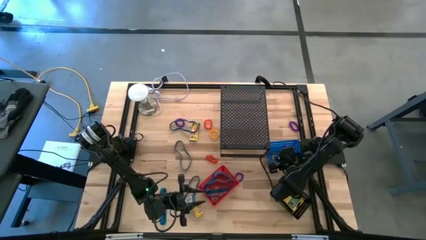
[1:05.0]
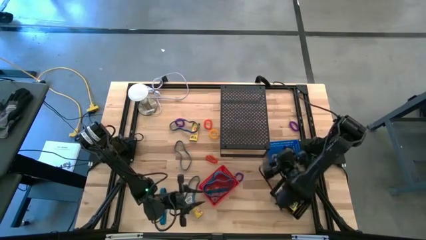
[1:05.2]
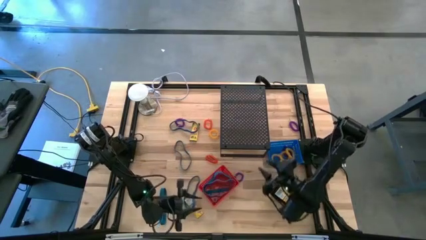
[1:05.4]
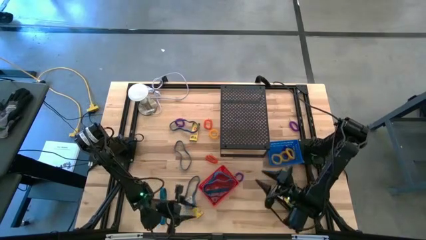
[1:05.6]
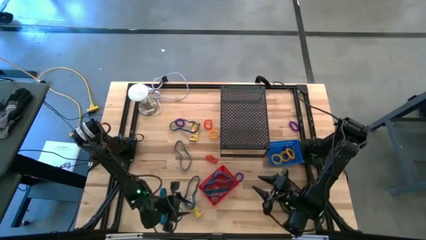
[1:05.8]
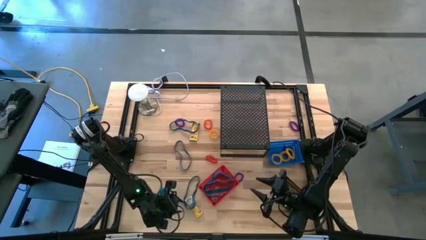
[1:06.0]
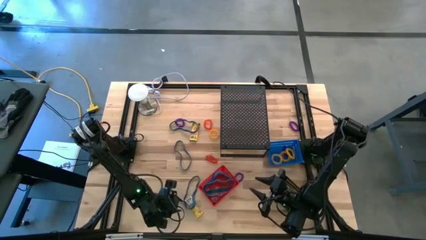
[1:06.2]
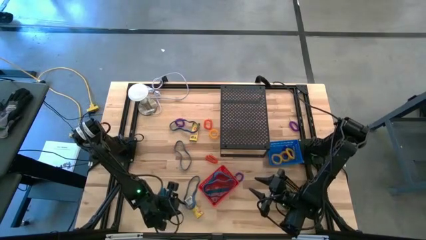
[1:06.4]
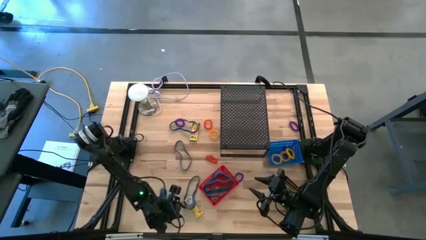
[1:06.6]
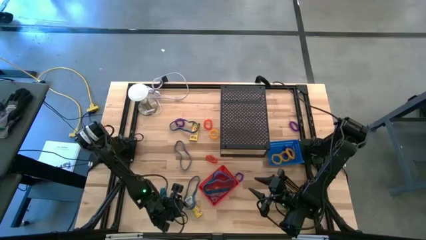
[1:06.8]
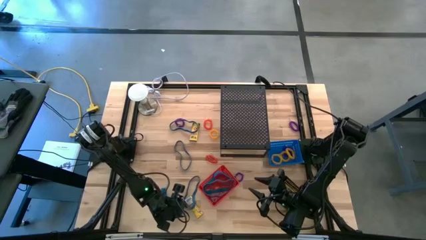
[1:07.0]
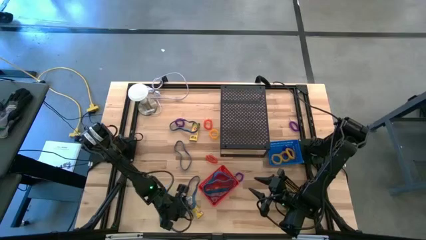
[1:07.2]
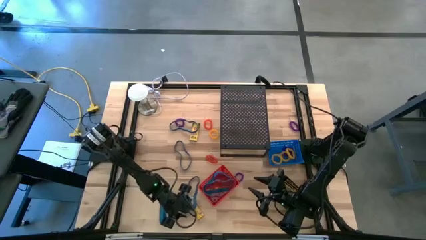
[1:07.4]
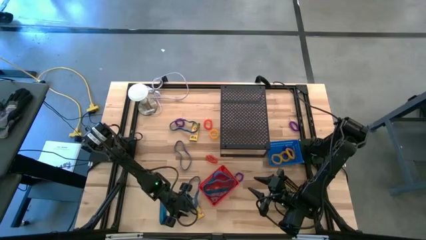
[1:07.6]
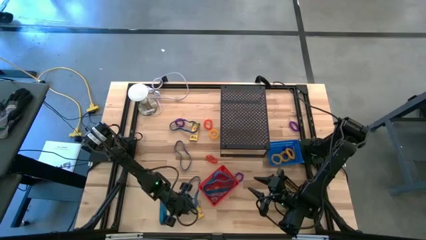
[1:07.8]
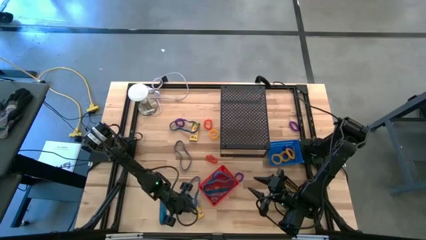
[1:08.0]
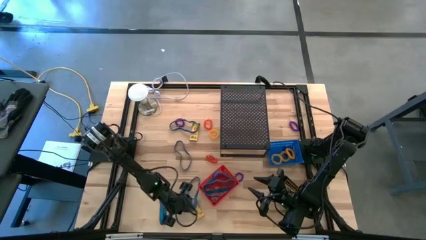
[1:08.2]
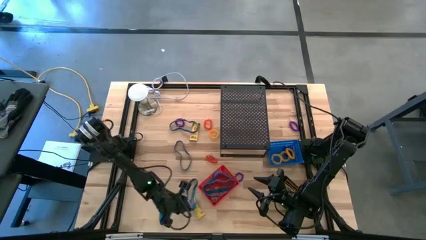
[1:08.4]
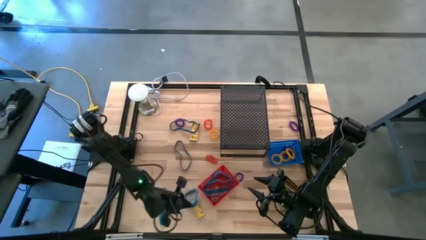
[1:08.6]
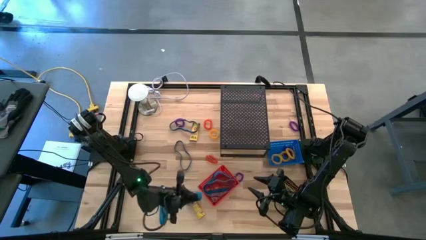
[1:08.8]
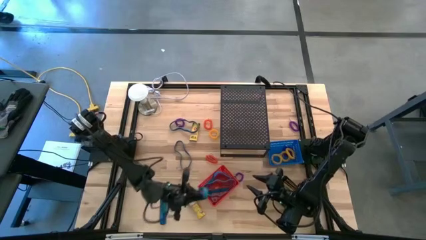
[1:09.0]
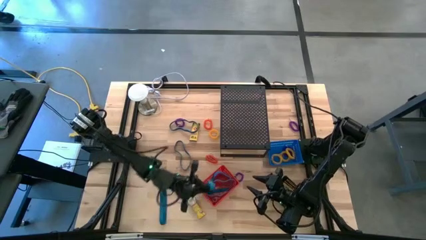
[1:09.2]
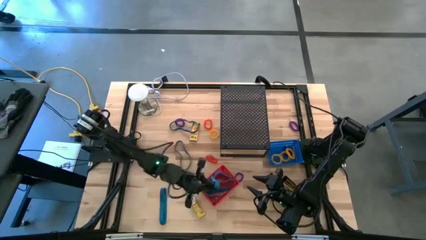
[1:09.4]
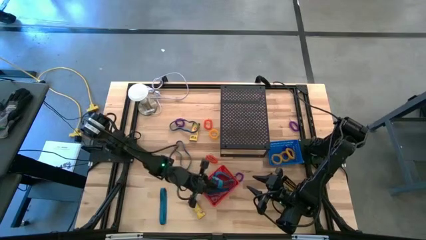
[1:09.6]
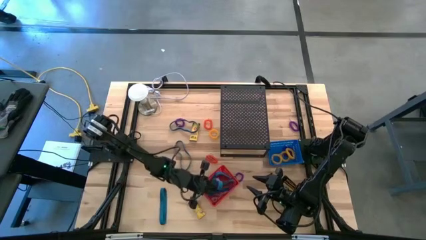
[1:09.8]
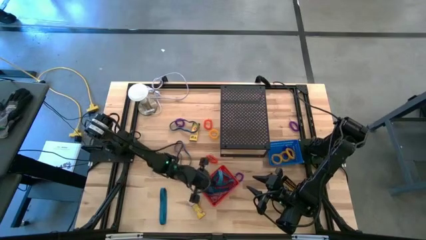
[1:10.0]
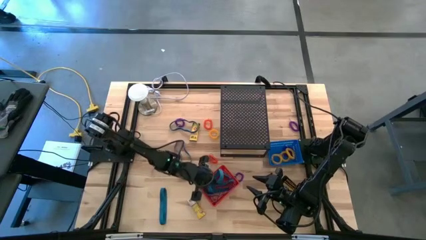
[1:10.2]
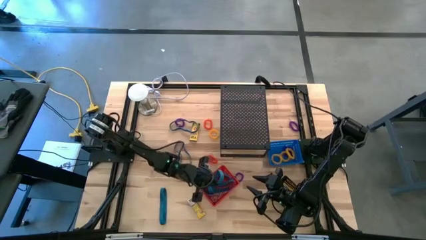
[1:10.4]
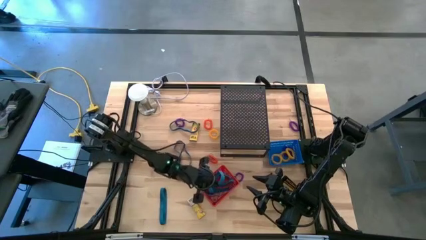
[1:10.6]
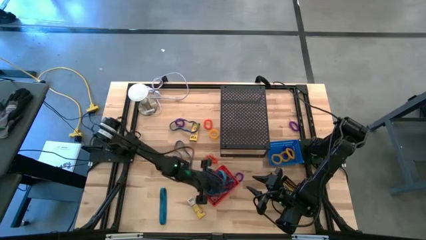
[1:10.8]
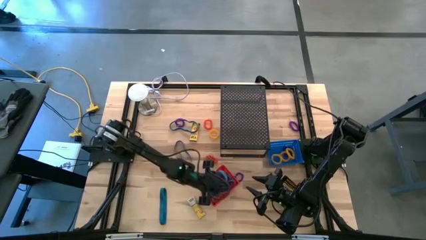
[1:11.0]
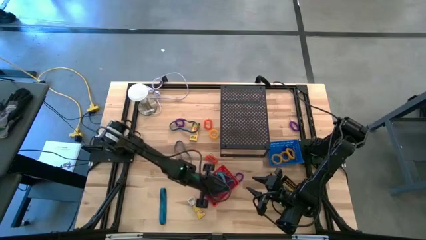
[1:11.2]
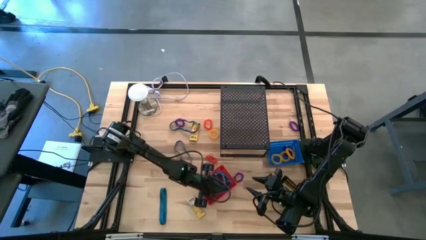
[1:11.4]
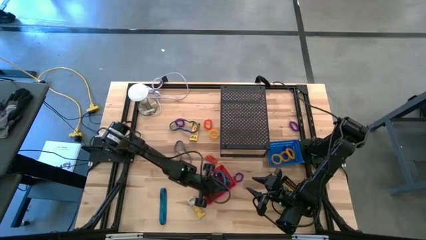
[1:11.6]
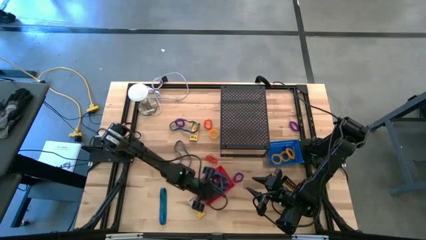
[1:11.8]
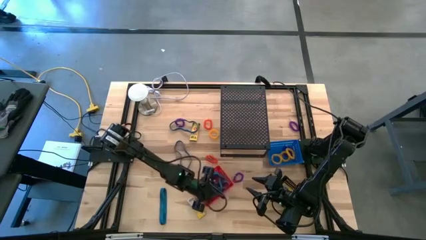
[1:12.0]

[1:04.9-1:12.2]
Task: Pick & Place Office Desk Supplies
Put the blue rubberband into the red basket

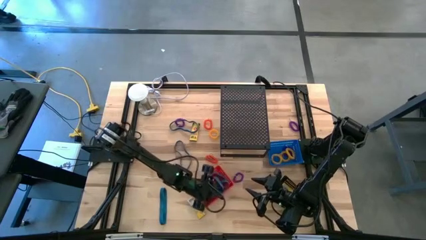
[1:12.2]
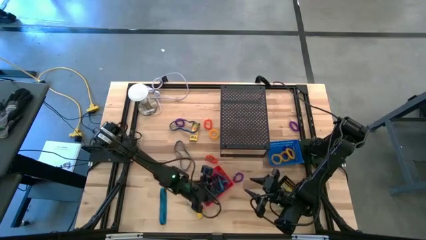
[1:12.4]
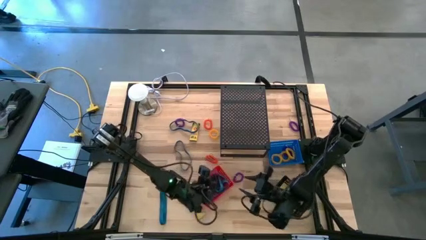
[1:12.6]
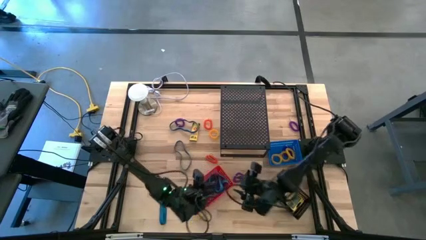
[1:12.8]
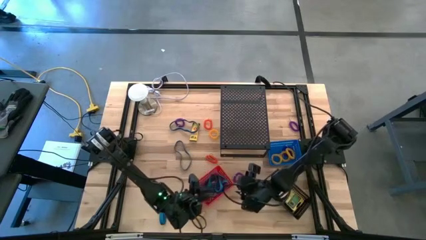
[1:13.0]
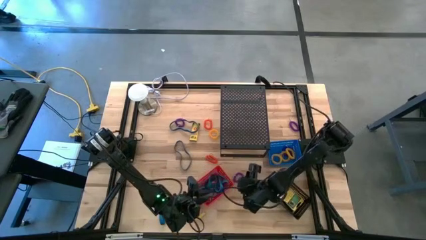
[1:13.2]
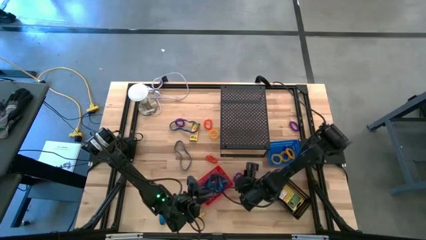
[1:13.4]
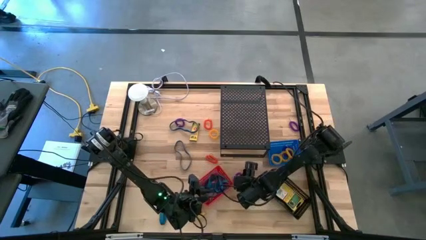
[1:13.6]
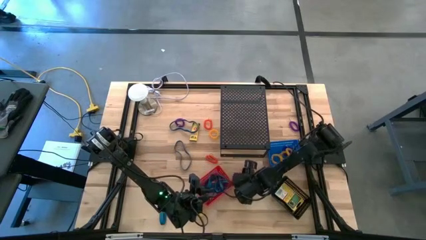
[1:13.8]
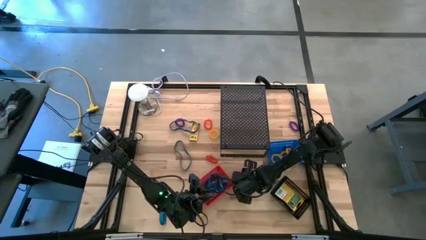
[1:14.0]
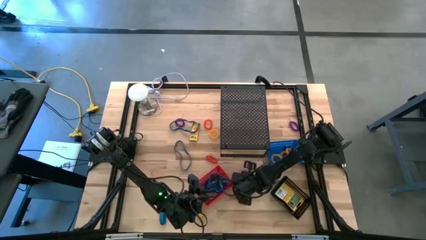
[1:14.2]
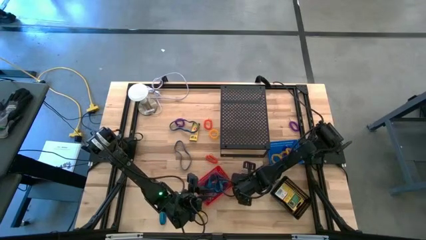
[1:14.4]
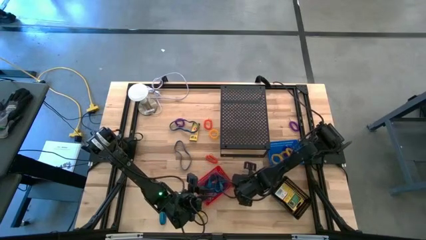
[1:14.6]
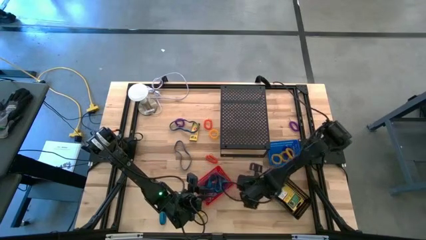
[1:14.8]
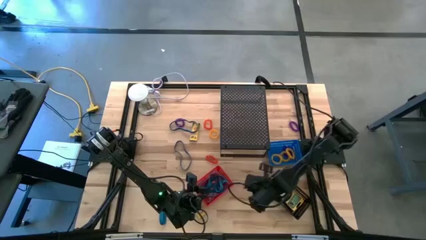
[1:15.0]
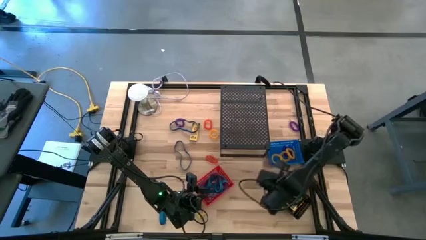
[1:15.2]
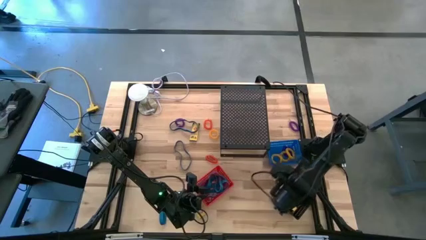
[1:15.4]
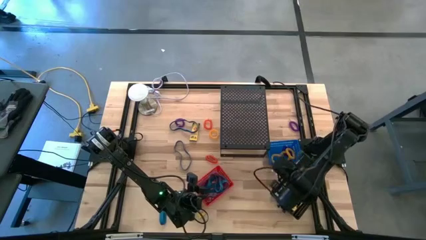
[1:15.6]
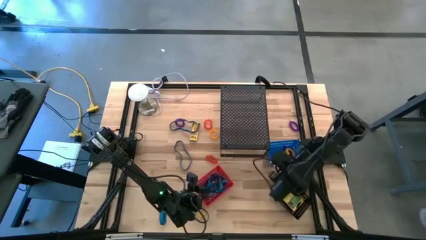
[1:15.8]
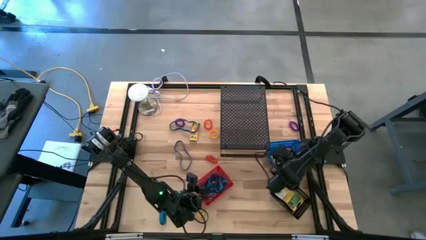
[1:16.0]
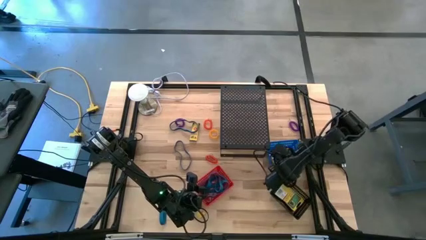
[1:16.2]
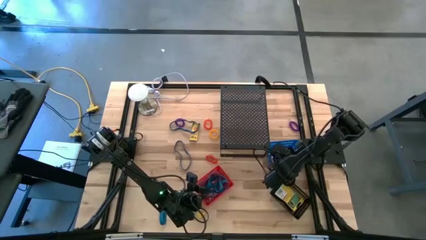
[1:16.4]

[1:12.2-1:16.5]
Put the purple spring keychain into the blue basket

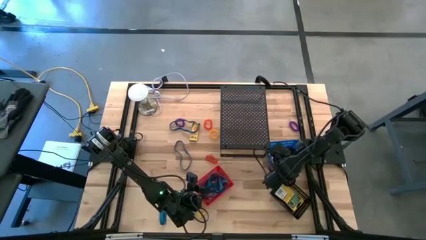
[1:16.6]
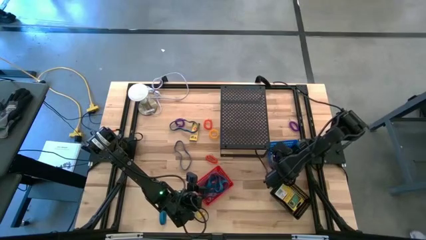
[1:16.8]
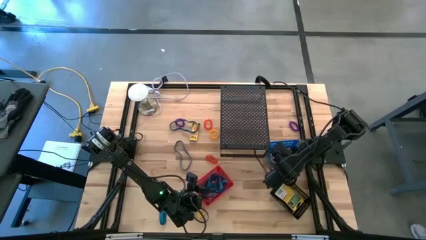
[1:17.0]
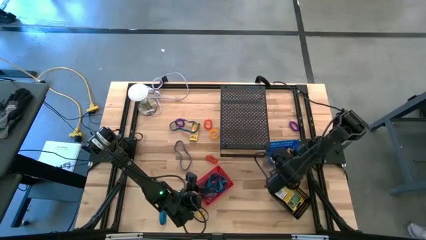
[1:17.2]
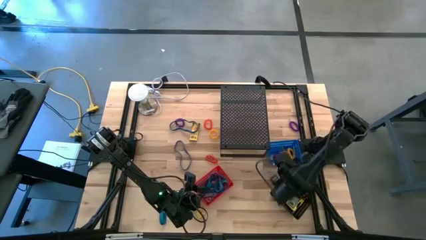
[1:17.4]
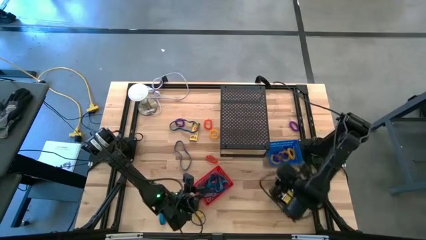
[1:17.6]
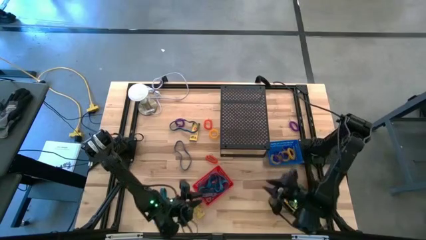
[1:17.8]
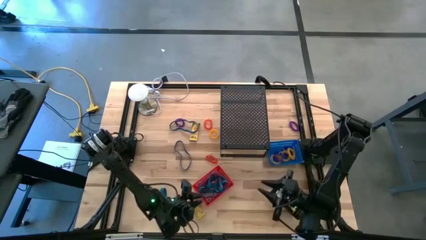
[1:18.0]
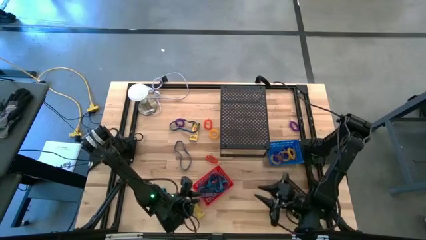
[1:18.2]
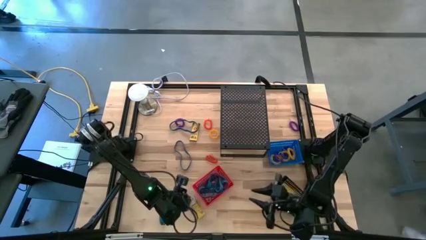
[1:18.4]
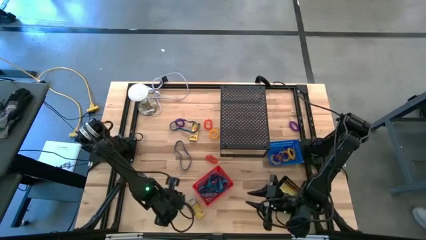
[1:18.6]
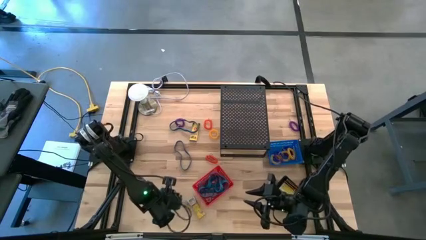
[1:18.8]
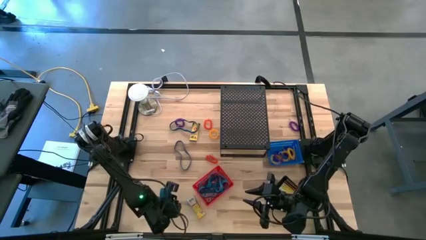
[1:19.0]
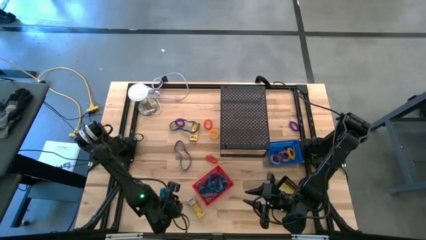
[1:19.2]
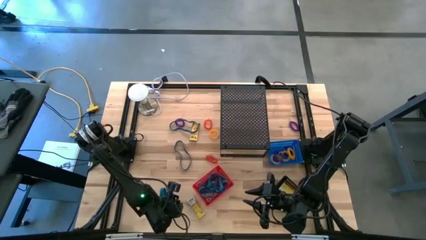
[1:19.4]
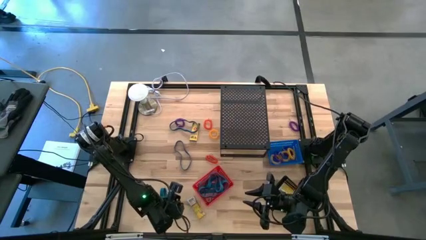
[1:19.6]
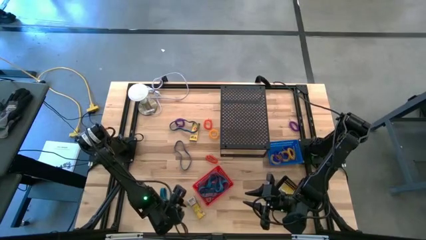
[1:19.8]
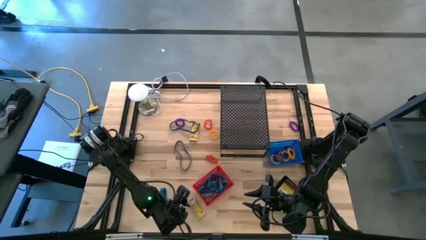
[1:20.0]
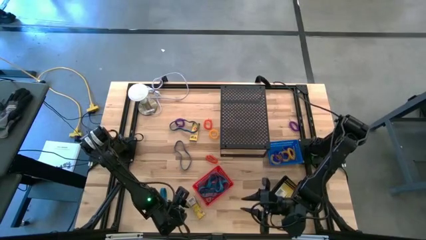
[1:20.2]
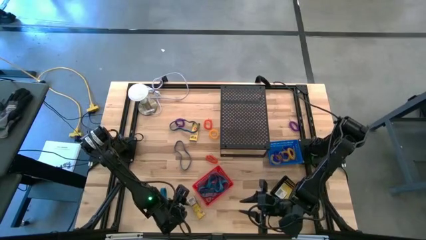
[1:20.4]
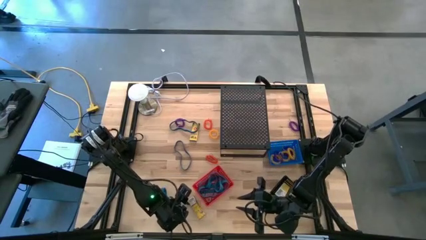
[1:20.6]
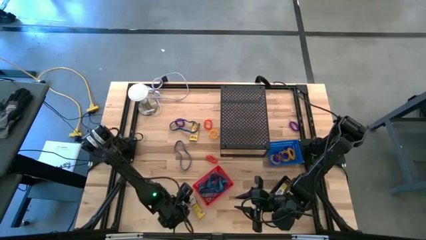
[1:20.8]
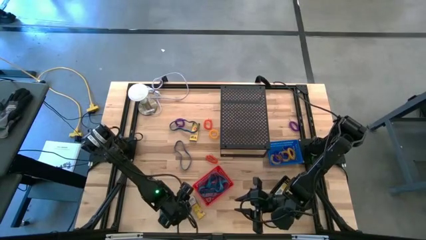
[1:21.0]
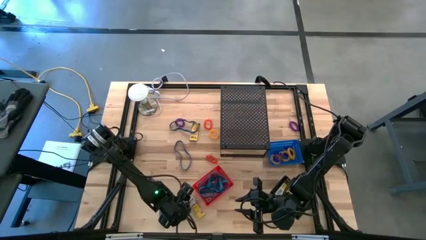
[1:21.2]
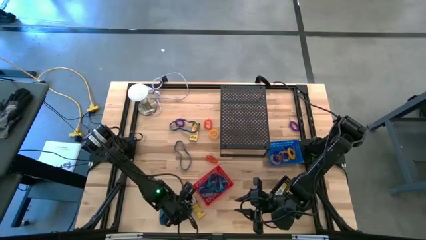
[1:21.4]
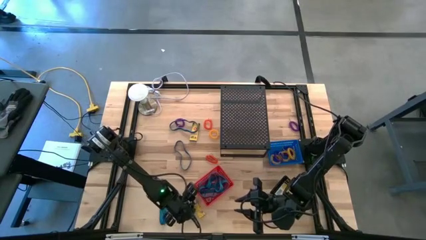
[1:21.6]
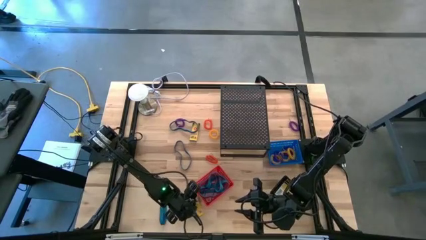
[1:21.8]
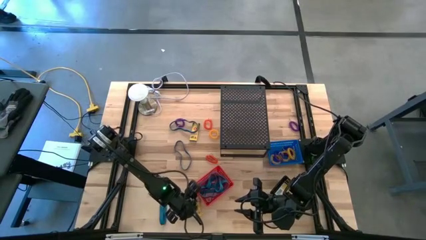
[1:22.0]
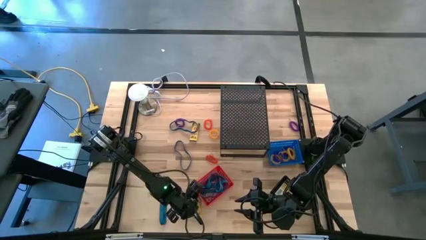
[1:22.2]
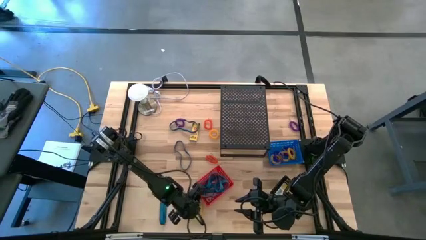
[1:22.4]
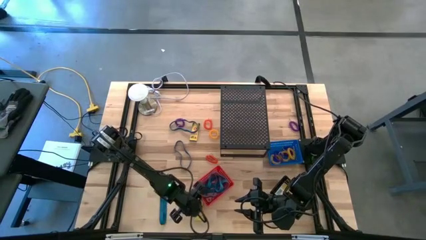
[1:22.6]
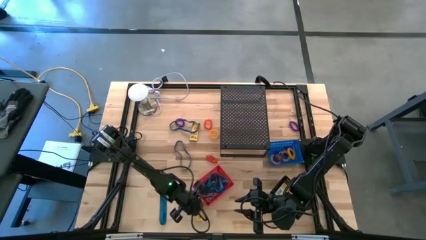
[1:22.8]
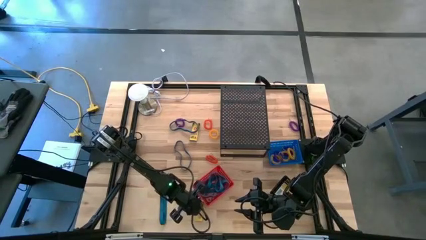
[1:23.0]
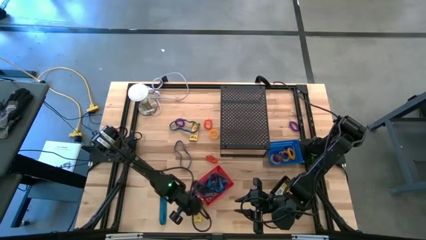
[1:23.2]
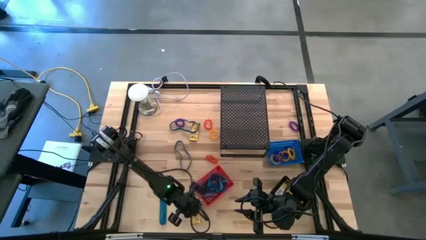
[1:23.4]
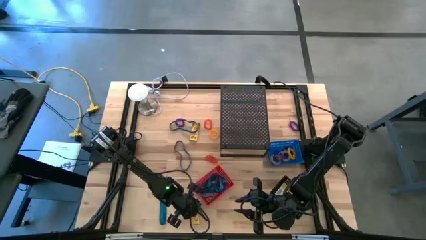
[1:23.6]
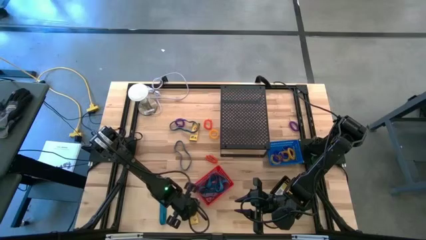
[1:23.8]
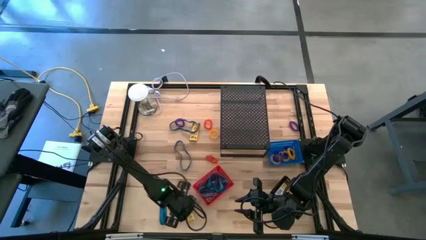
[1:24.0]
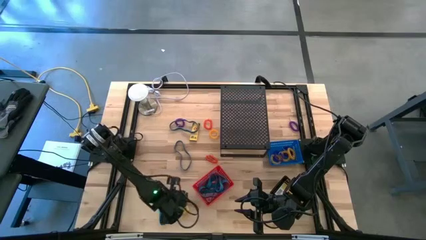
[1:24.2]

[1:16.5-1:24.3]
Put the small crayon box into the black basket
